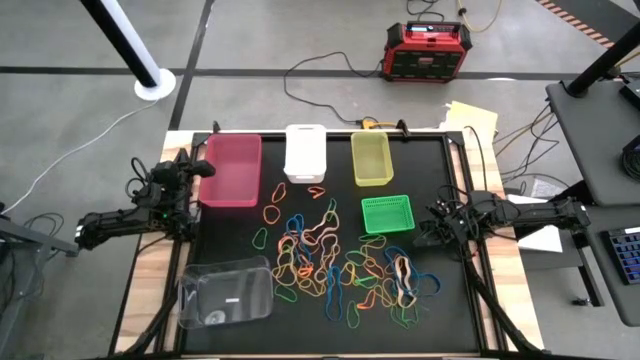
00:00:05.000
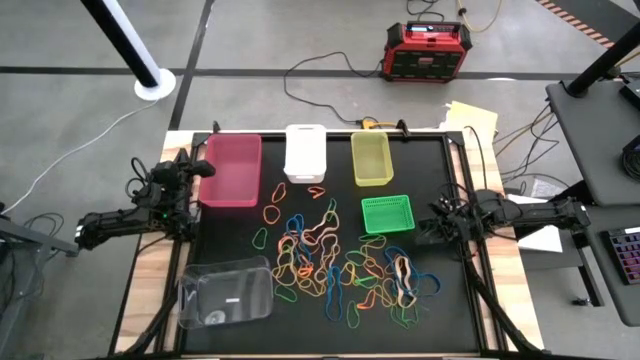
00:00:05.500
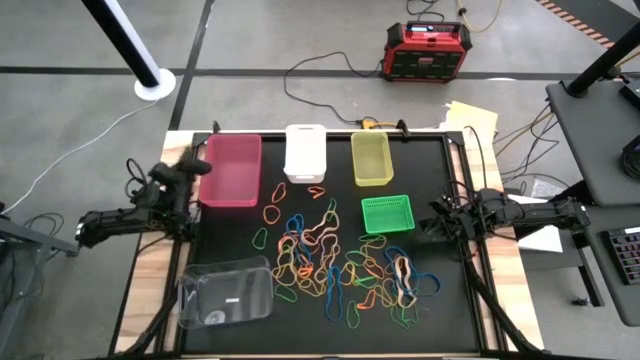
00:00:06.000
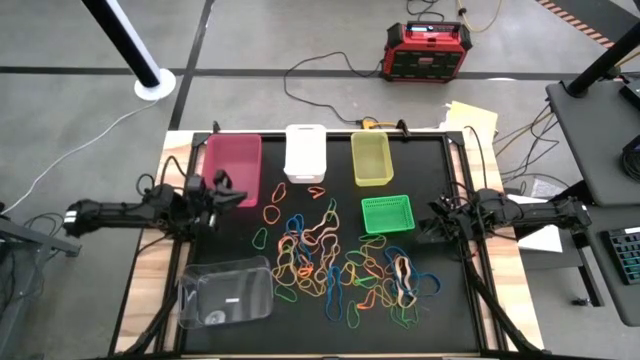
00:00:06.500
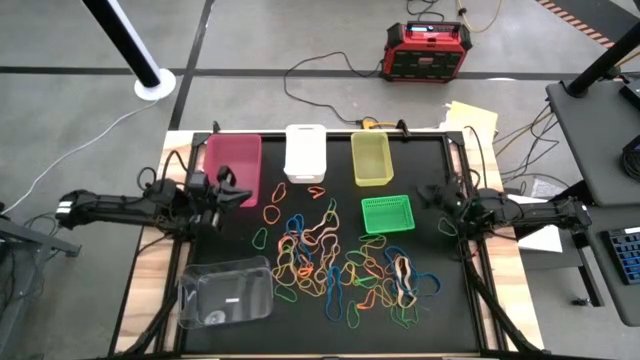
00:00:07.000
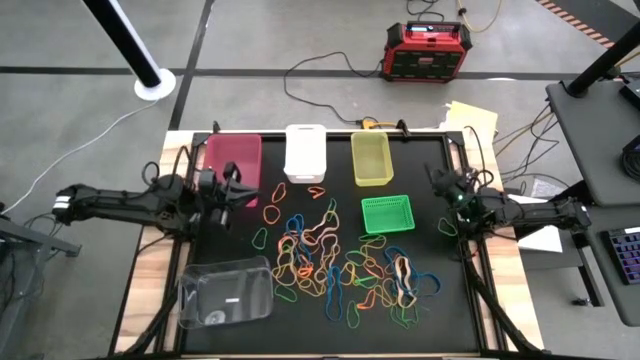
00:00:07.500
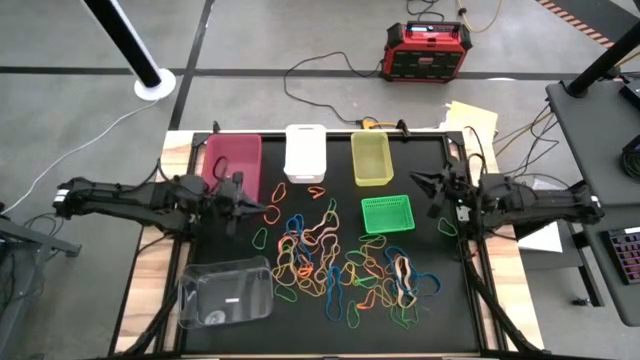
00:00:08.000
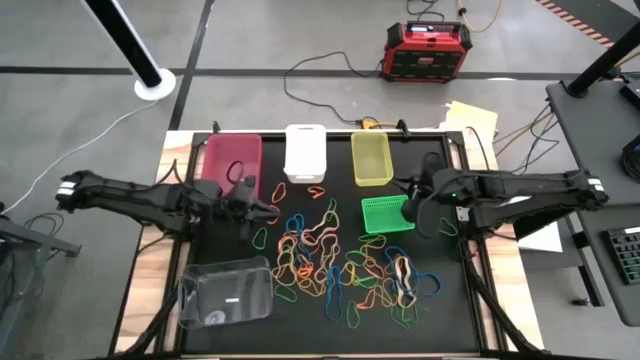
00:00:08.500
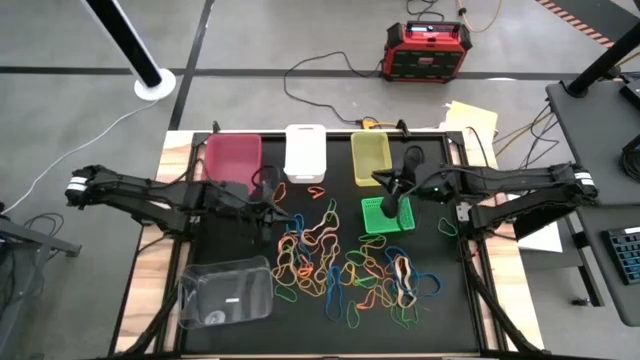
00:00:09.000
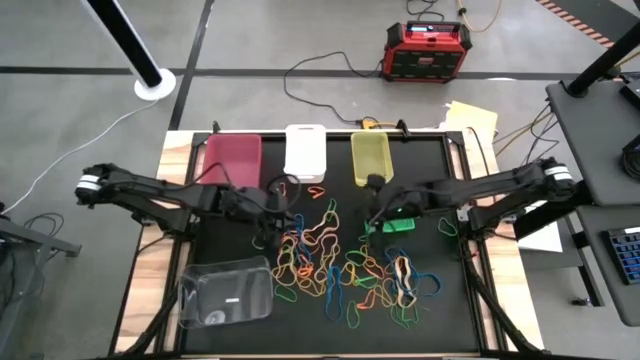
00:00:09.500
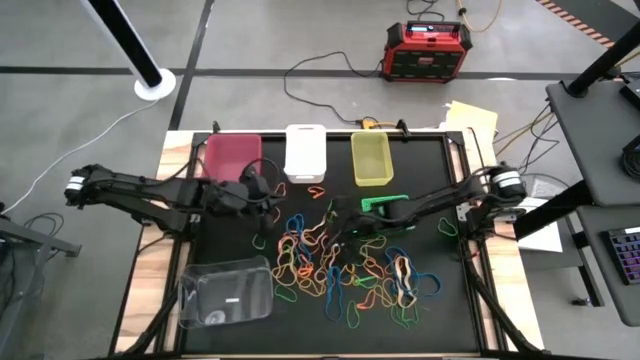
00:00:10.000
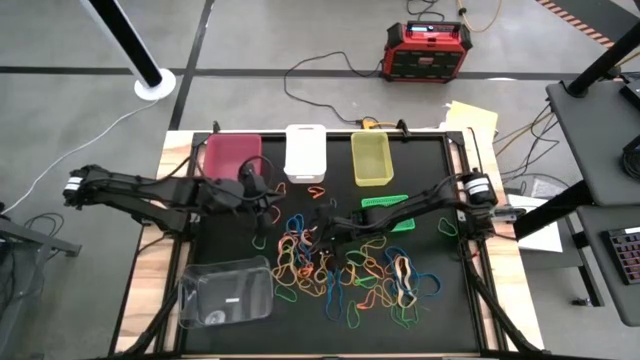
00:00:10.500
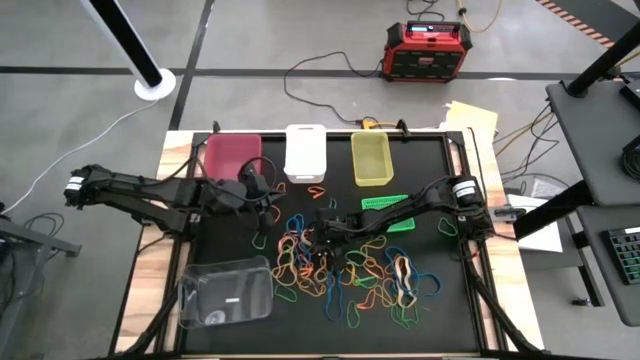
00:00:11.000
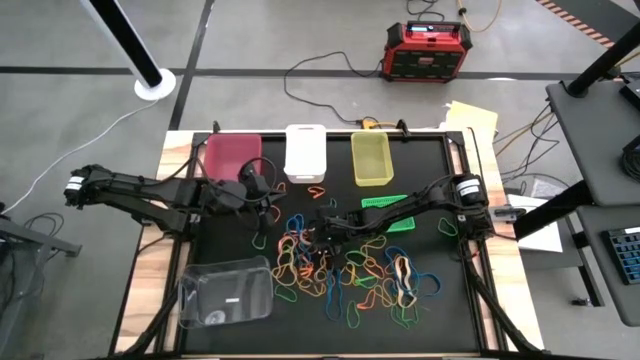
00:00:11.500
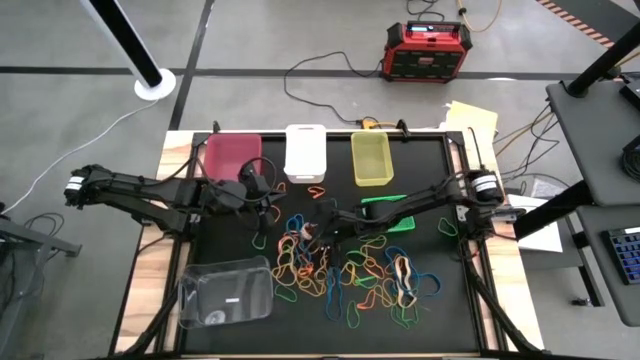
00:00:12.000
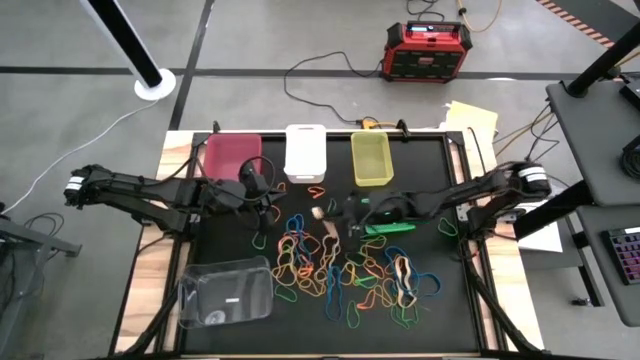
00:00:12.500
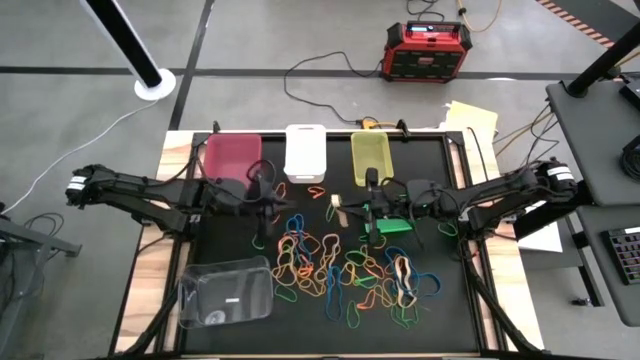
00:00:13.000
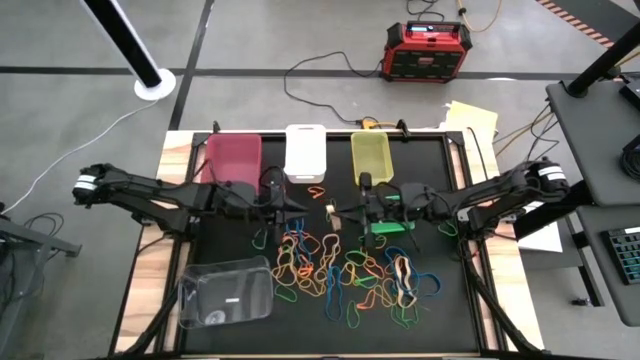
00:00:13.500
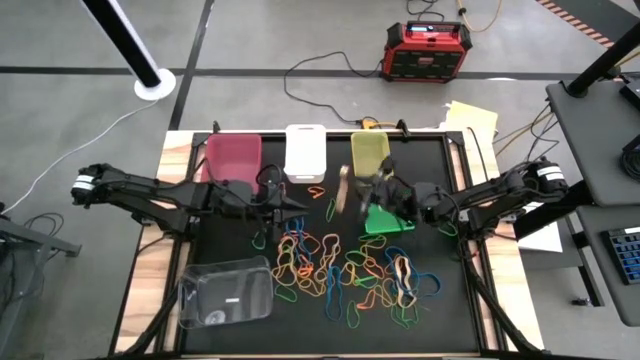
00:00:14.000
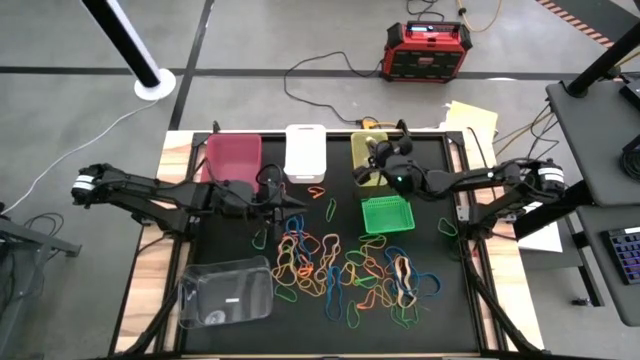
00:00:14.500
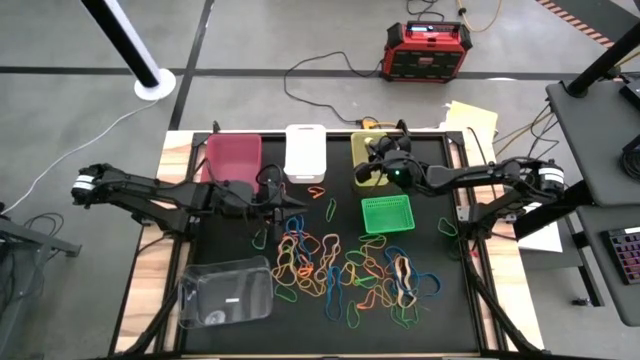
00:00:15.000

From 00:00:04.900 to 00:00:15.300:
Task: Sort rubber bands into baskets
Put the brown rubber band into the yellow bin

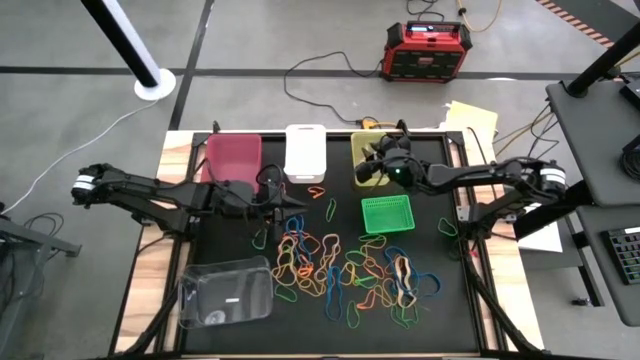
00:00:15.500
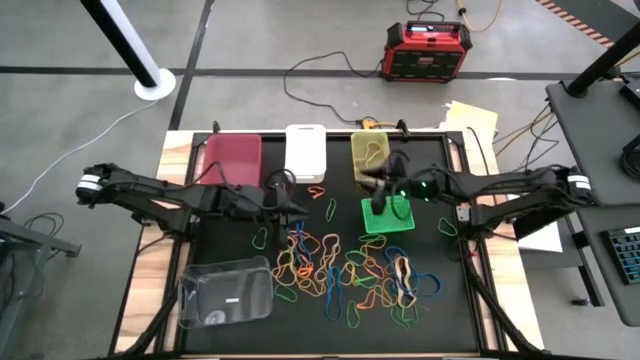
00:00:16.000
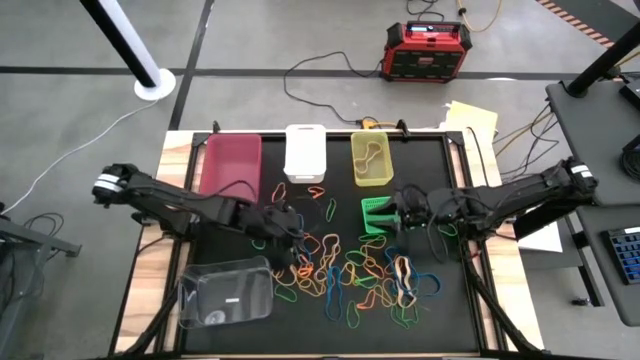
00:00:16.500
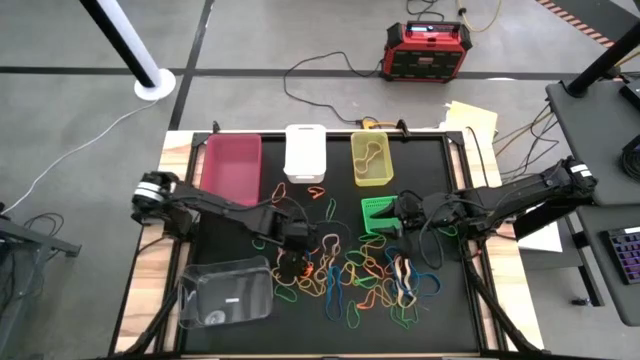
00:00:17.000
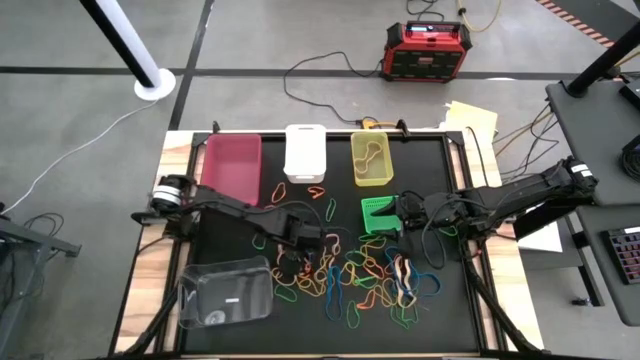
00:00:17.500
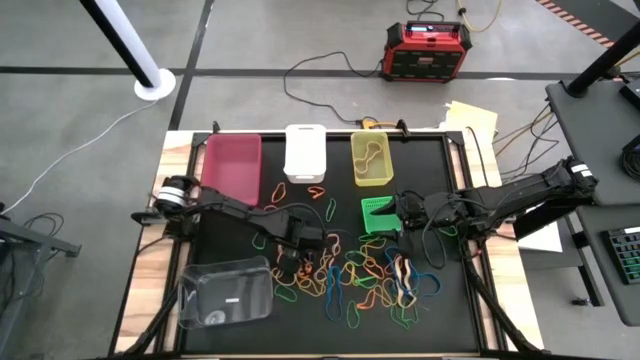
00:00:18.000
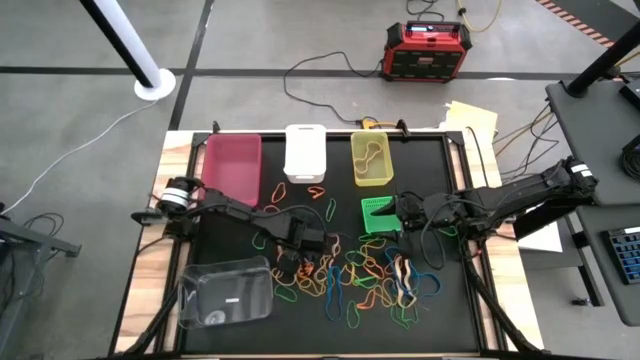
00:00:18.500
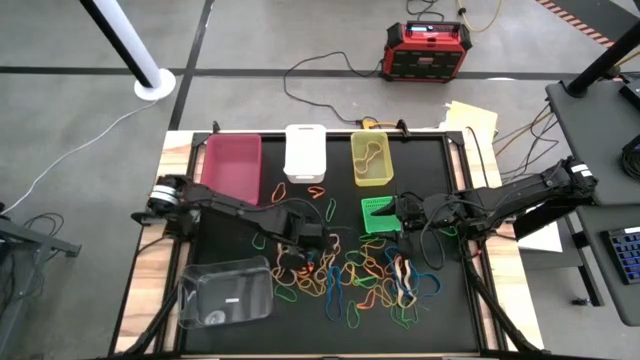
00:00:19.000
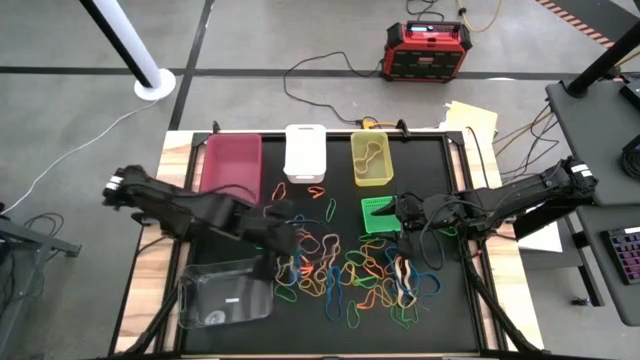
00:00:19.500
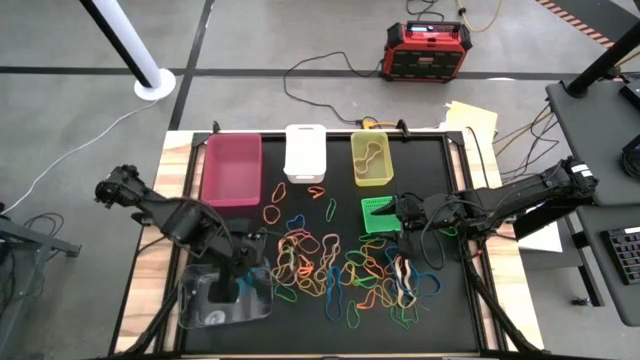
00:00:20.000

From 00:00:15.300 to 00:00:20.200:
Put the blue rubber band into the transparent bin

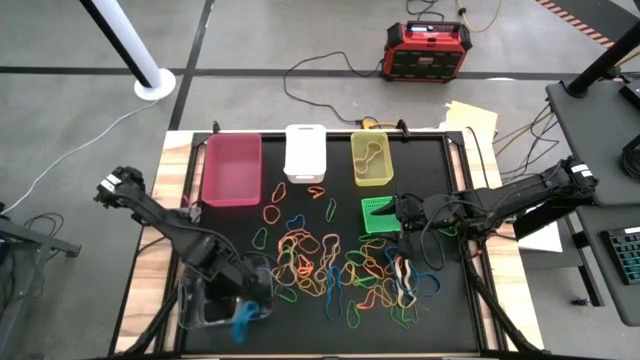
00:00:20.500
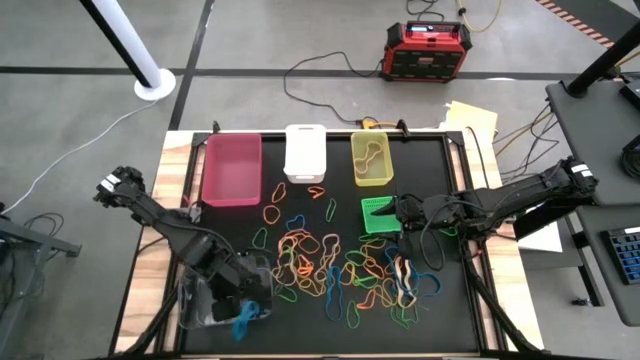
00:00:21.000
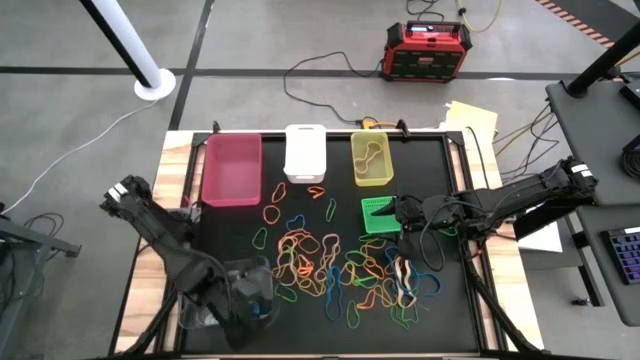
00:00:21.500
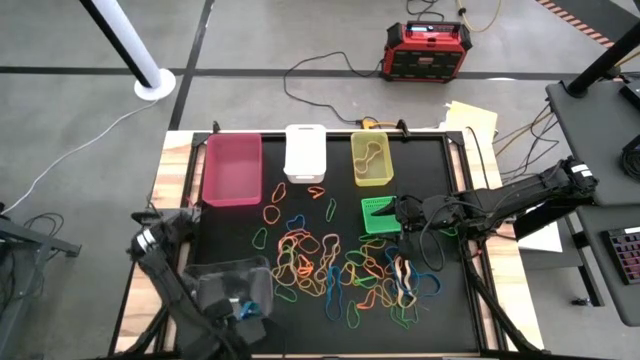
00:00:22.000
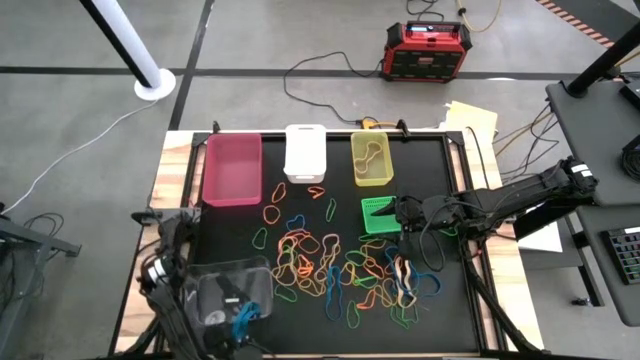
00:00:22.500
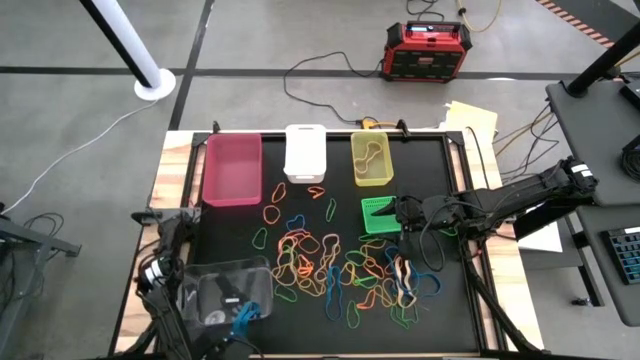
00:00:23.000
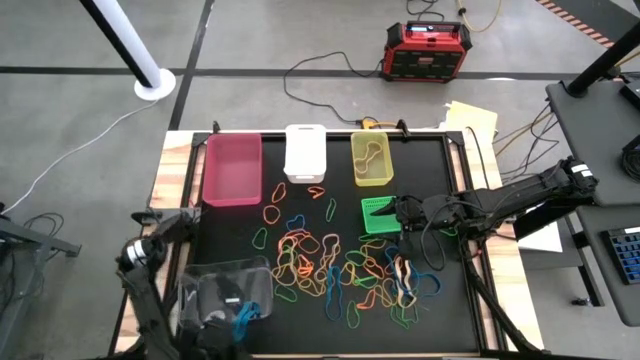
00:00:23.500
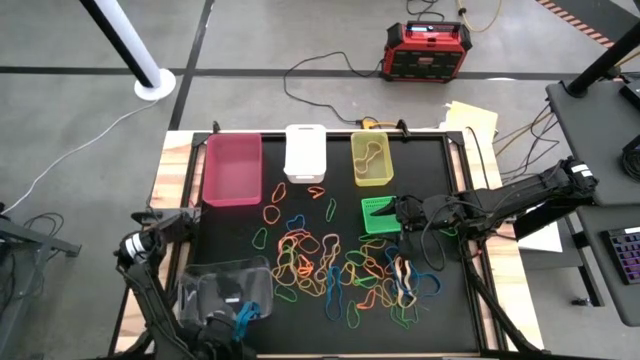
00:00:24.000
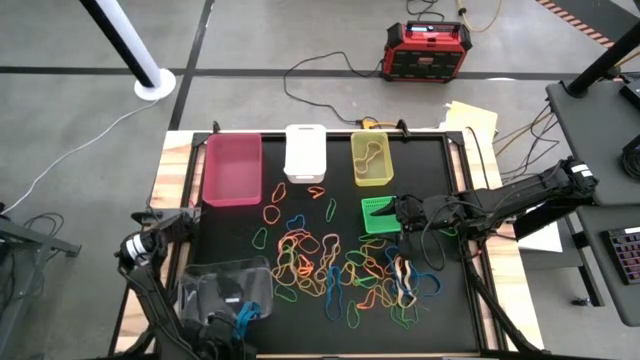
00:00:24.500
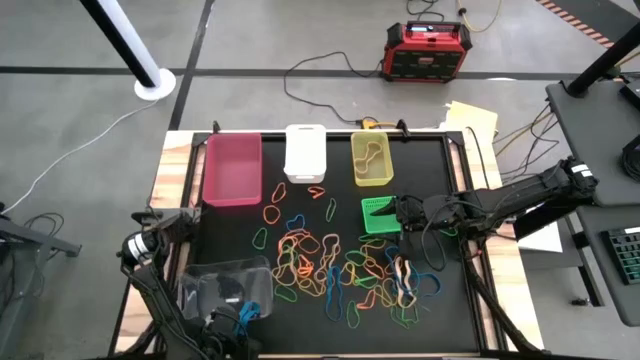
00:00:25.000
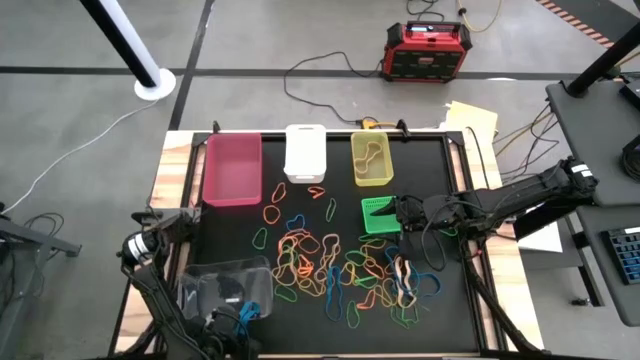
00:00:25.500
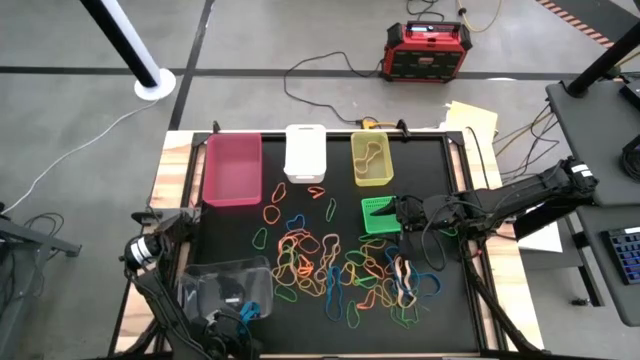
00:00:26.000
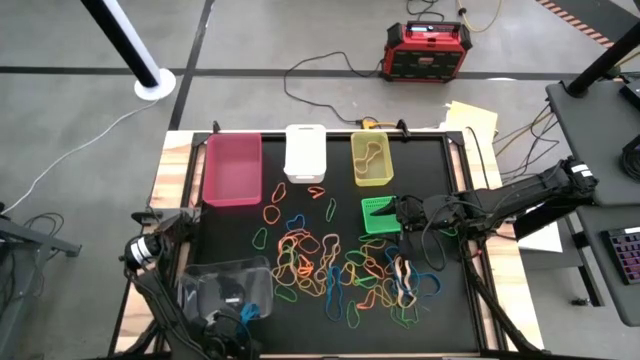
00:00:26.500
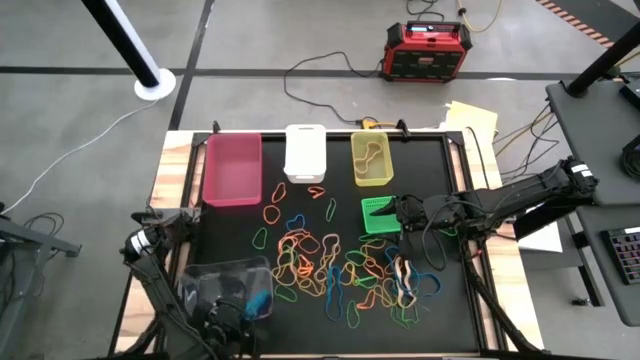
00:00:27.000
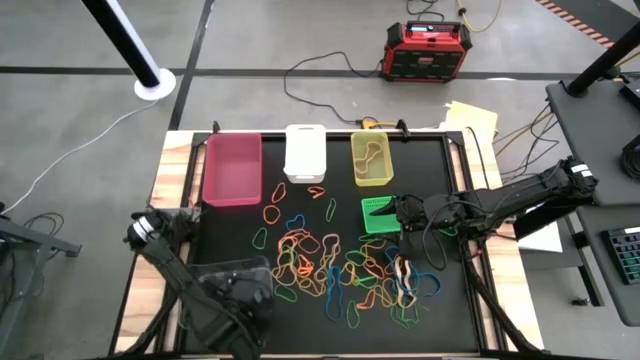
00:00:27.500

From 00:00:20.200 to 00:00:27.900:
Put the blue rubber band into the transparent bin
